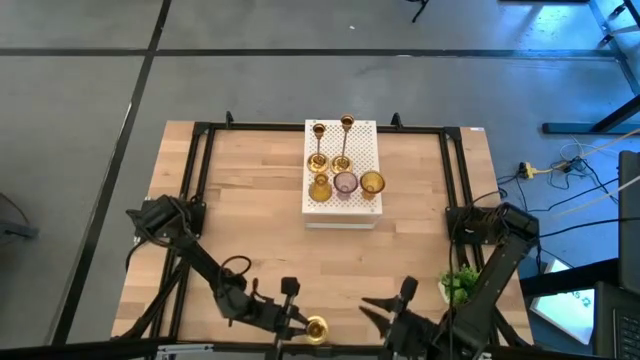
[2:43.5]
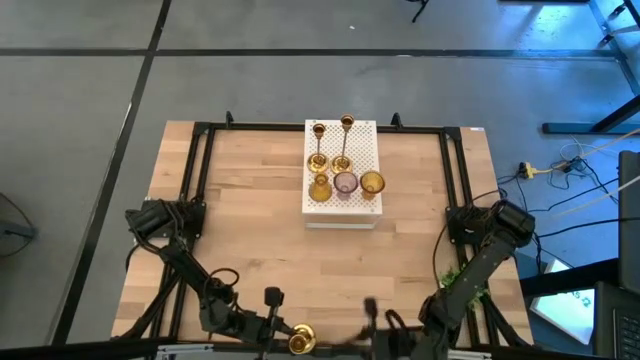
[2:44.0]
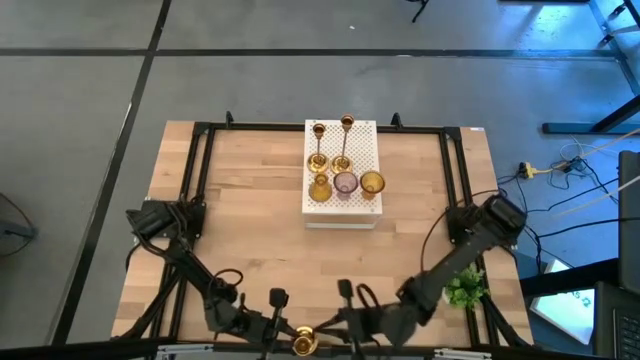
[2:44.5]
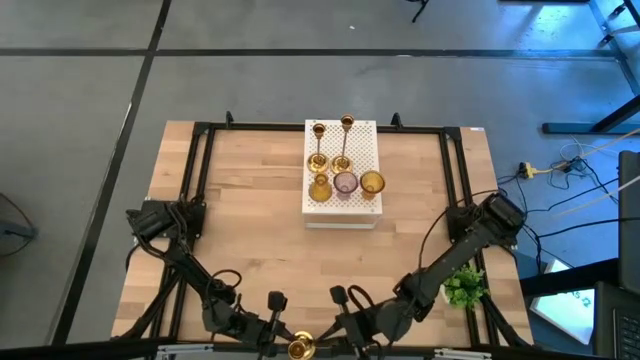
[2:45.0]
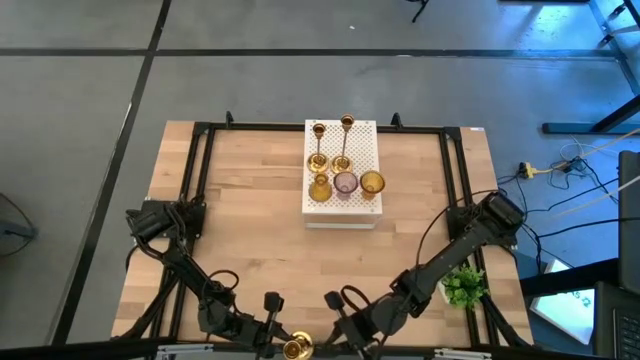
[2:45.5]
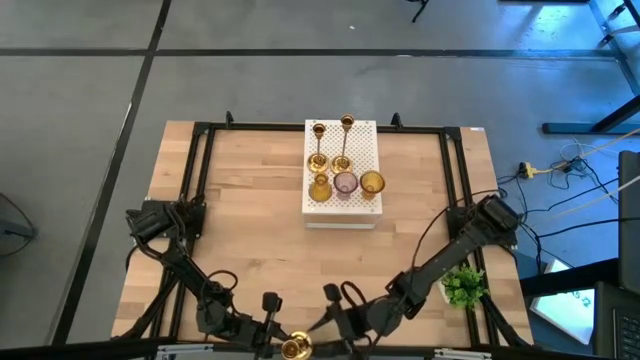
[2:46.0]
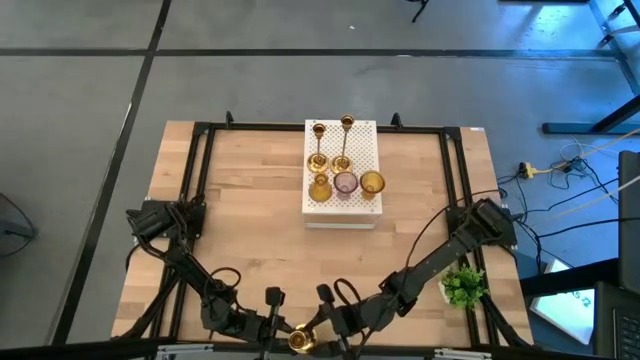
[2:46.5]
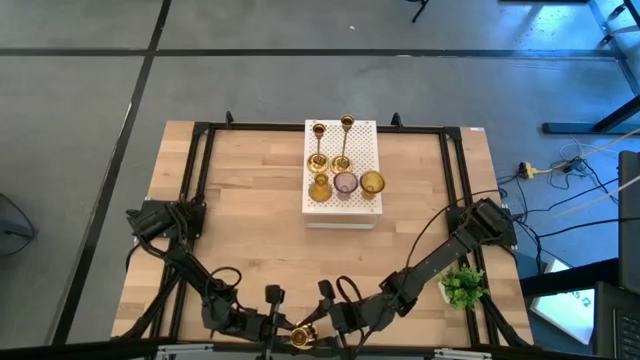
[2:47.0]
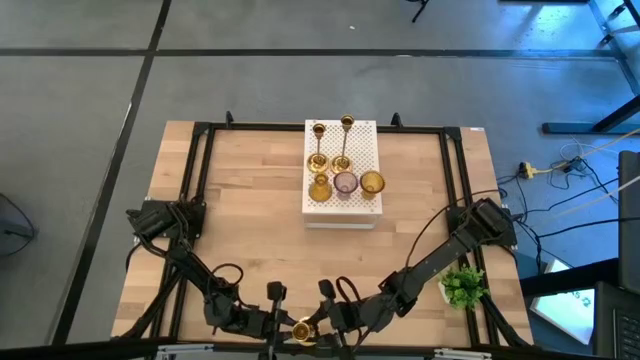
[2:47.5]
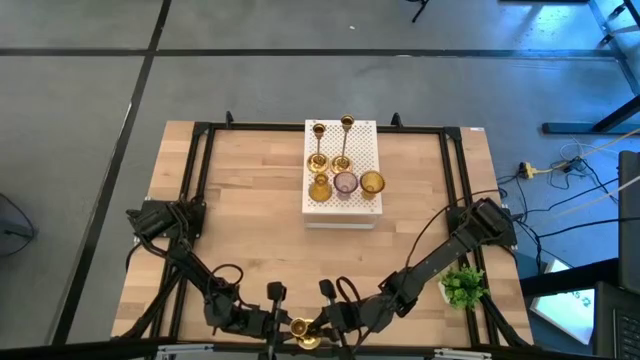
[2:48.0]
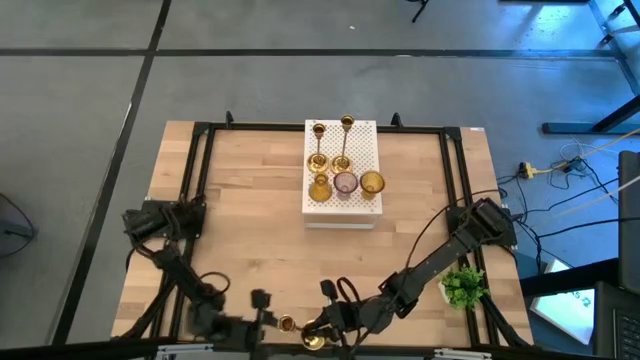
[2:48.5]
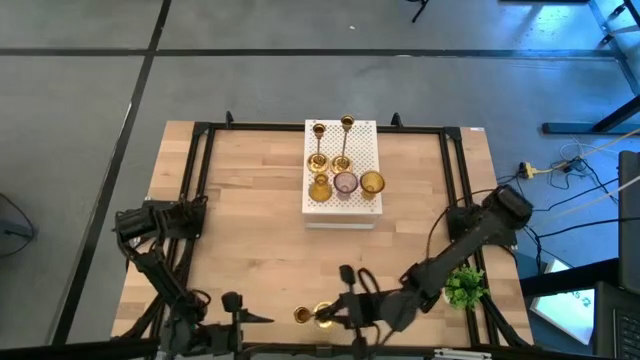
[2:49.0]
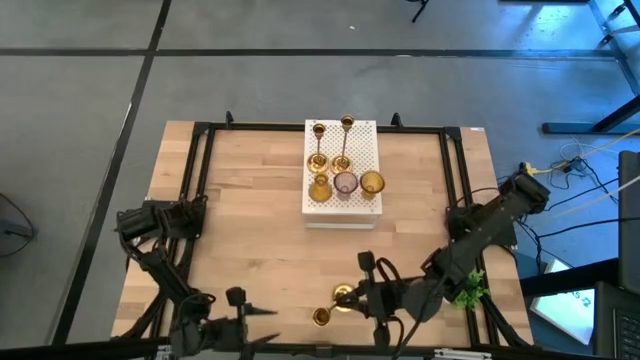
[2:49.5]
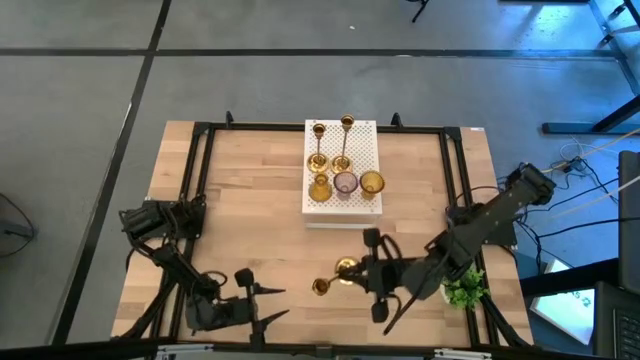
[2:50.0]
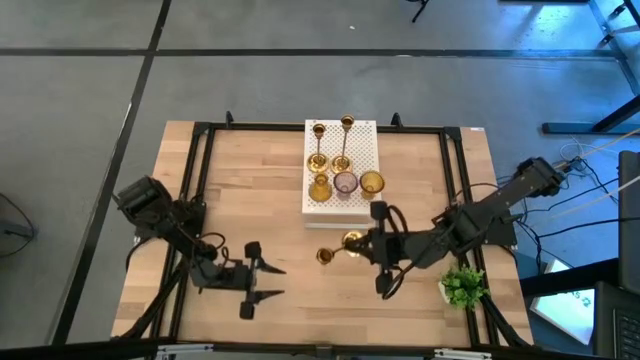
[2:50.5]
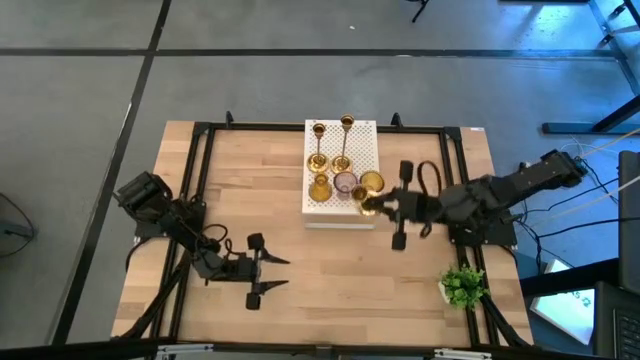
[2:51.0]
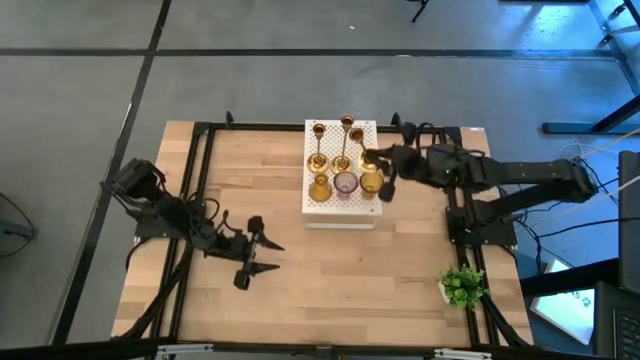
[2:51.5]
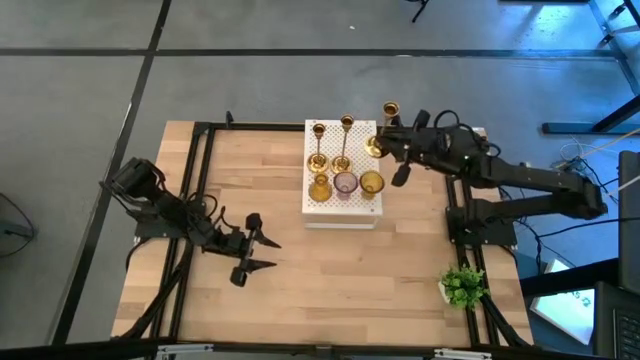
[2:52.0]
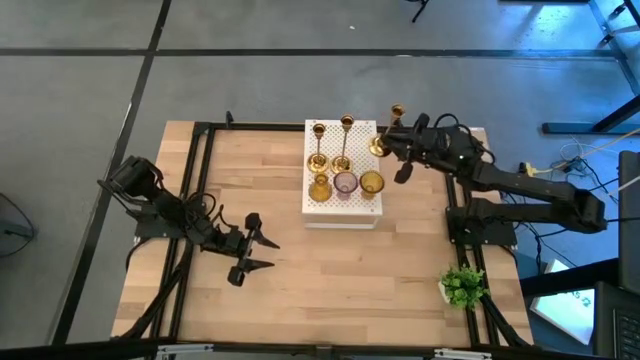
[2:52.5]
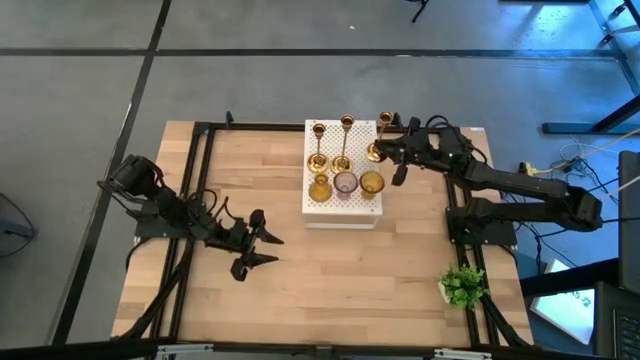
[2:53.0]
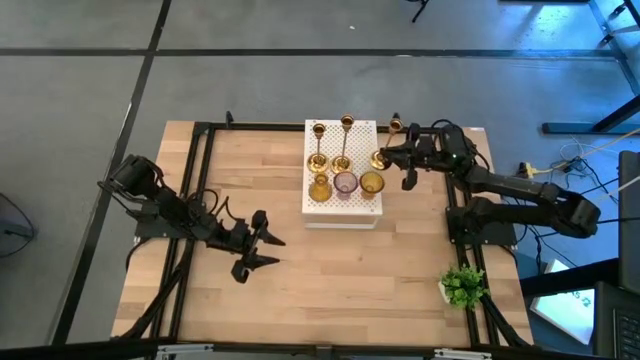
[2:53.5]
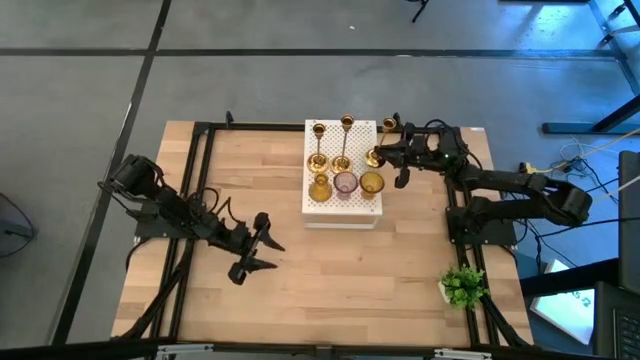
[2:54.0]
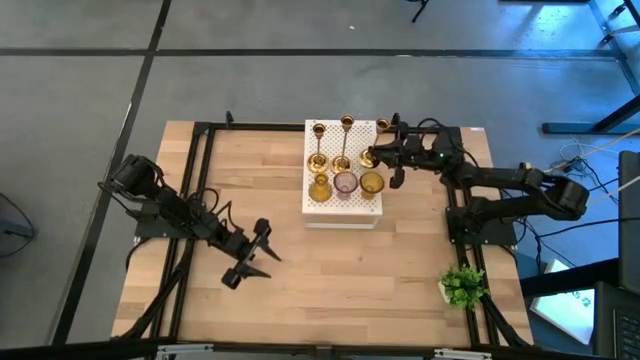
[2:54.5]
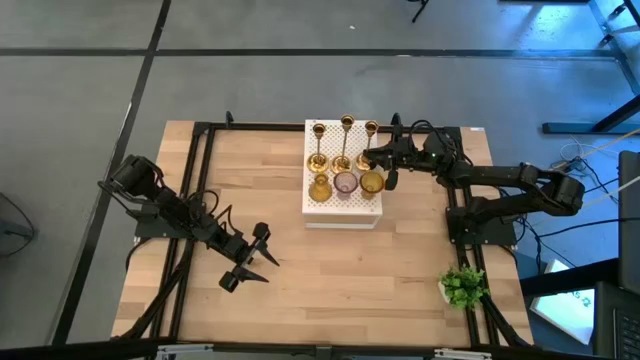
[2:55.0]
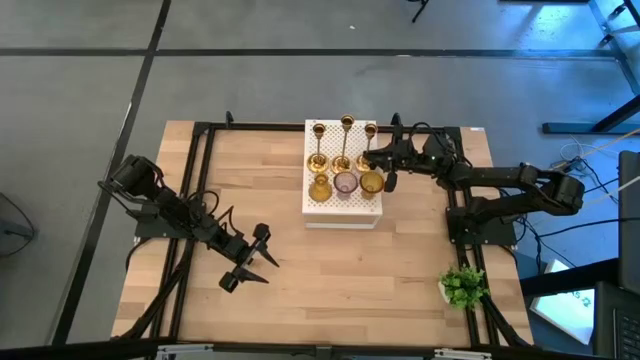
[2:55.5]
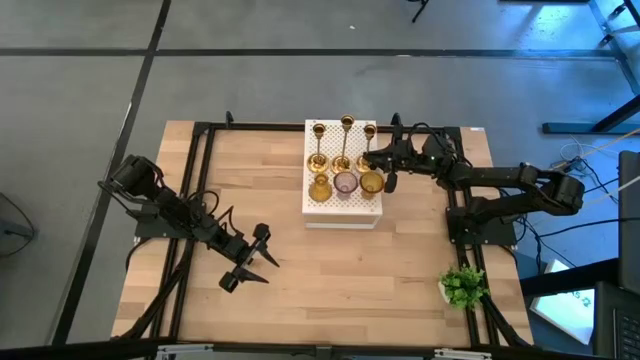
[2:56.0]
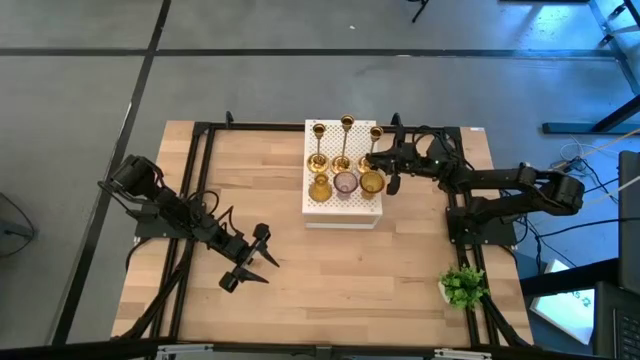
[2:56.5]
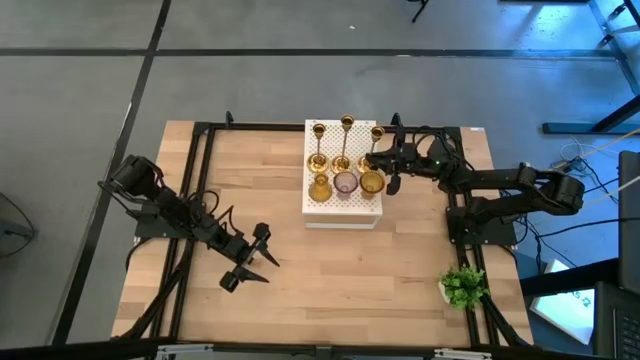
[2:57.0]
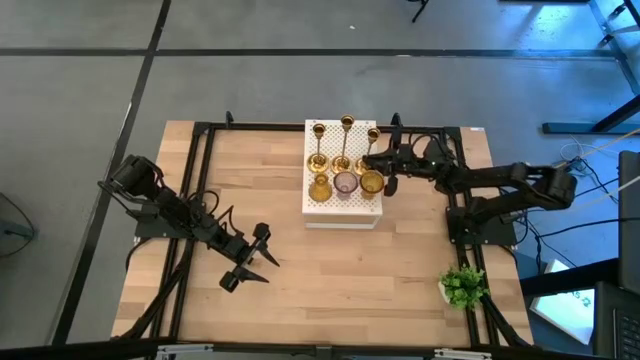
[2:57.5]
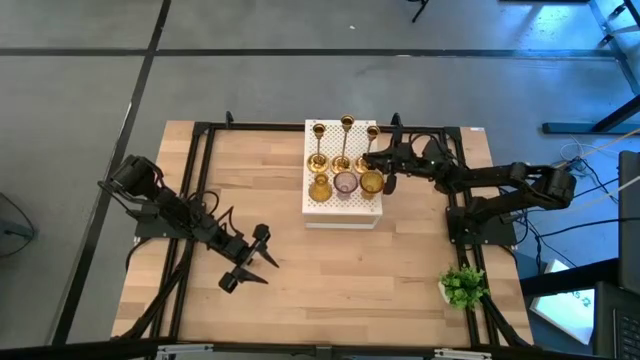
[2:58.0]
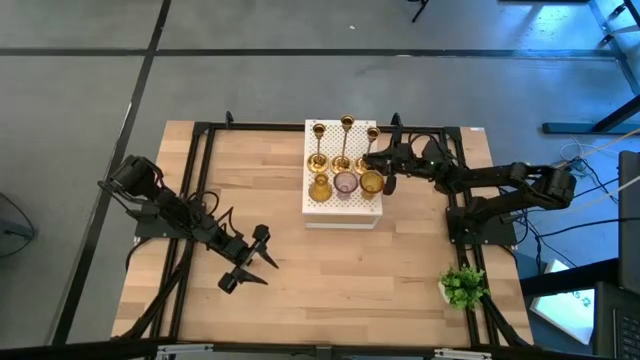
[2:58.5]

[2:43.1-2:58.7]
Task: Pick & Place candle stick holders
Put the gold candle holder on the shelf

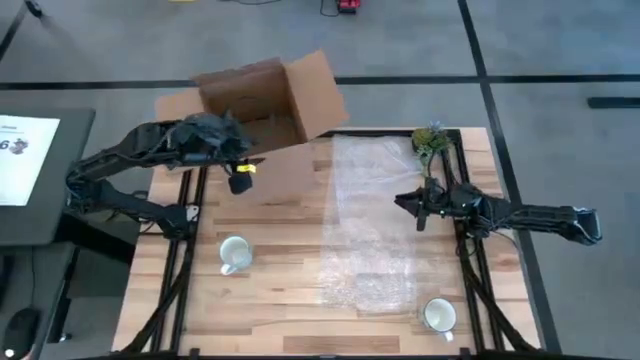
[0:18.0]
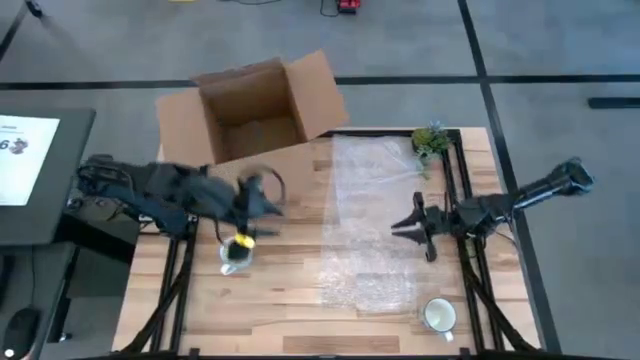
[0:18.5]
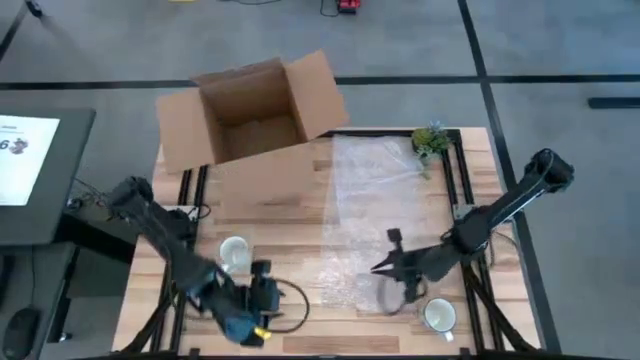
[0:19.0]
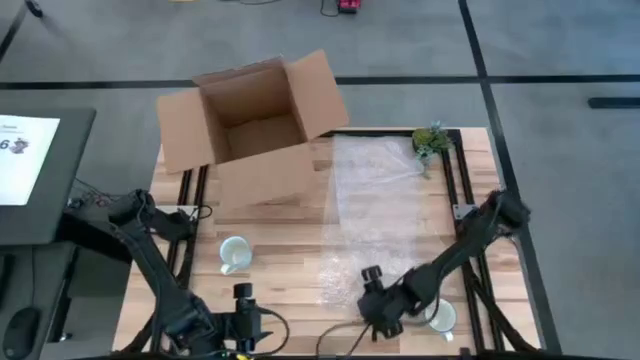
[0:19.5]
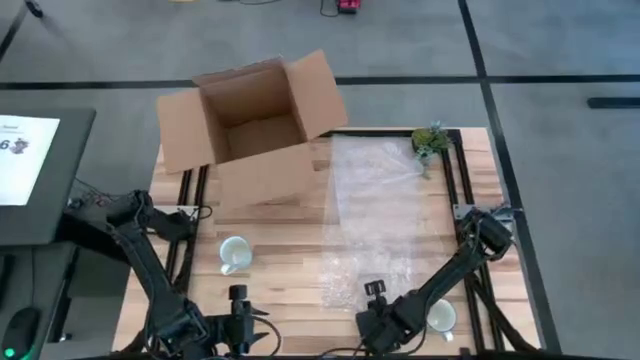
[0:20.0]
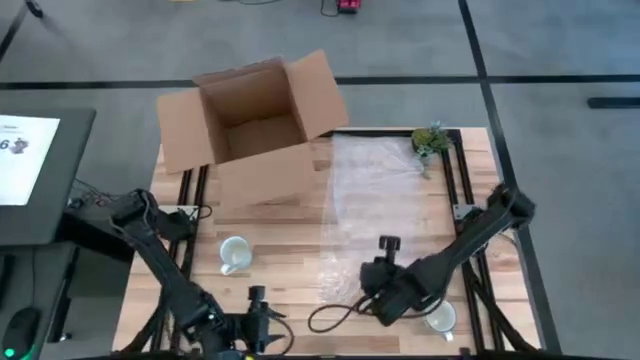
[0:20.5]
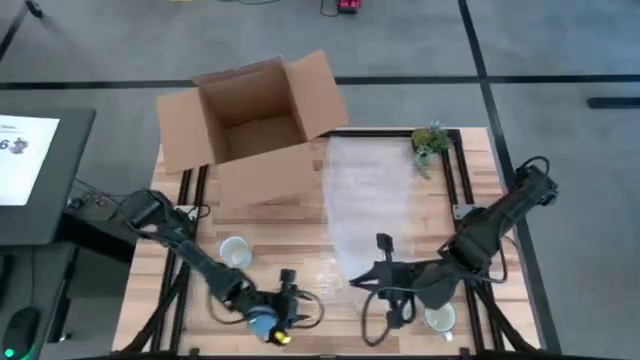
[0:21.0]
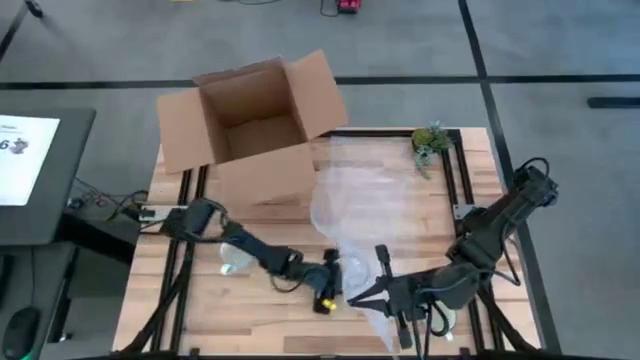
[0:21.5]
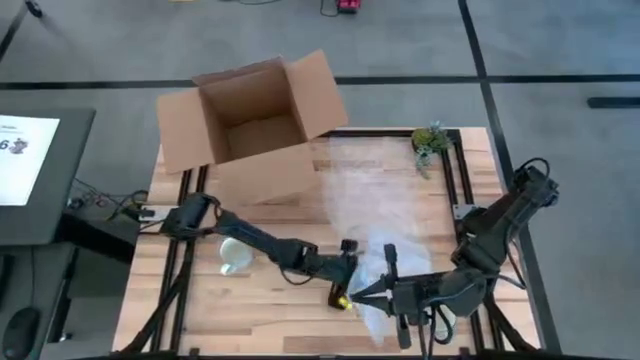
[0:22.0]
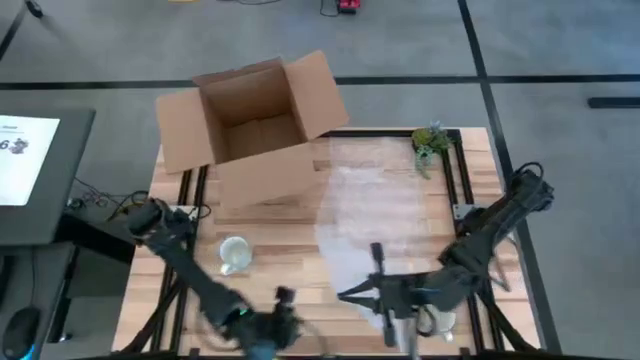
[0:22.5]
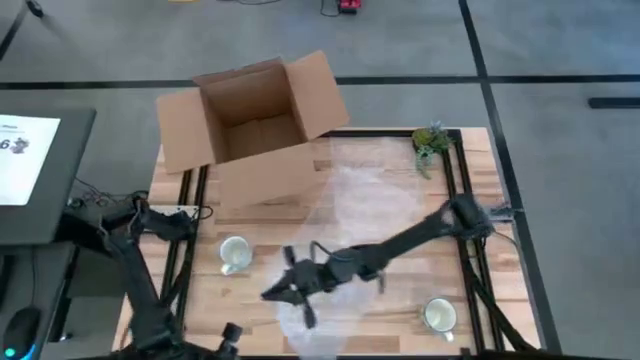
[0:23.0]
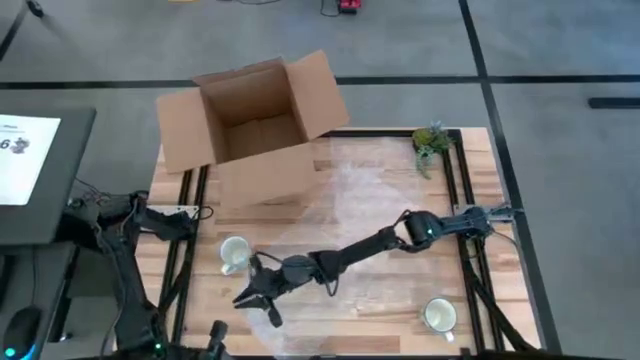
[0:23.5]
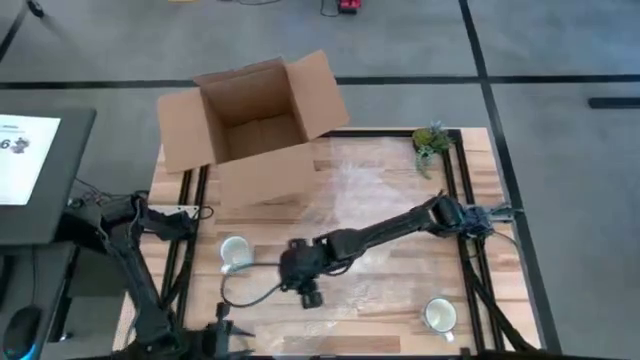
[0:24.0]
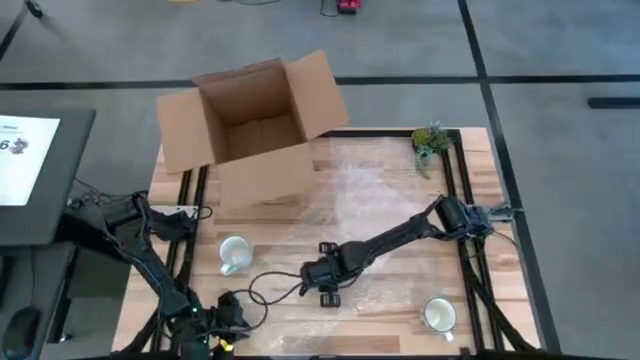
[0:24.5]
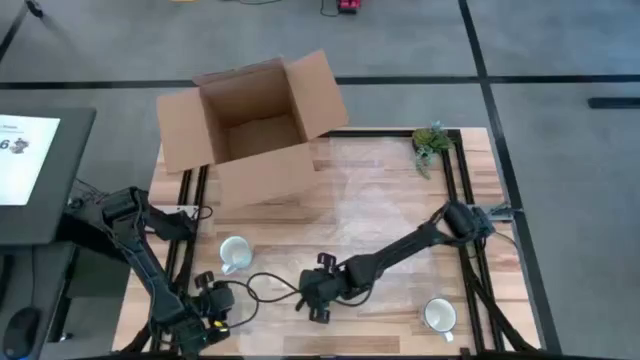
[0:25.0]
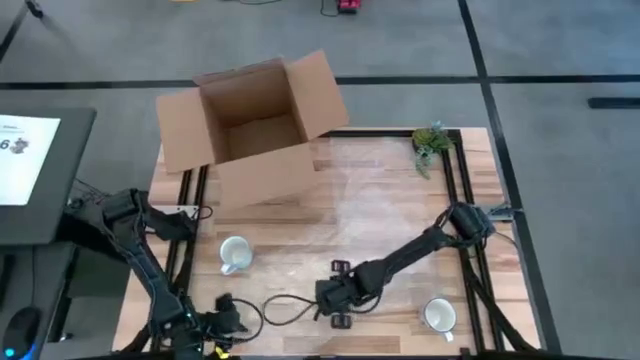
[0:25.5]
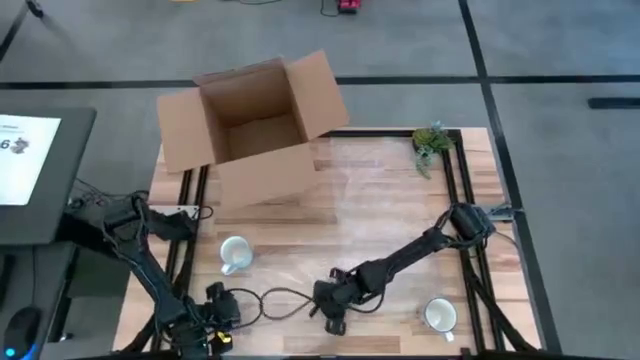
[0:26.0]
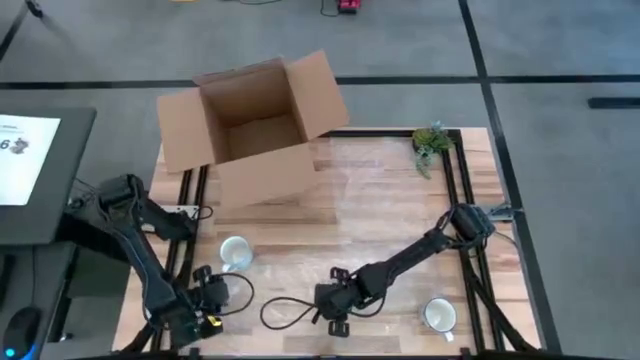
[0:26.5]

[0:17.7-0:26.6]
Task: wrap mug
Prepare the bubble wrap
